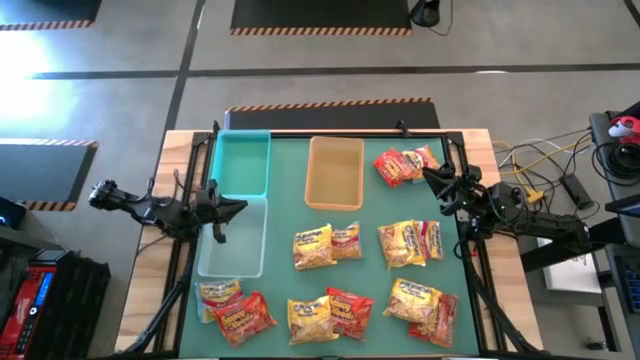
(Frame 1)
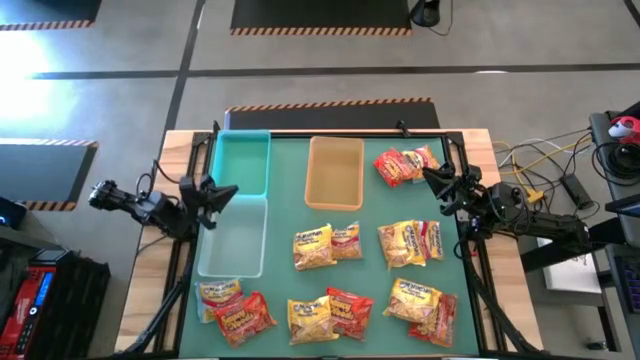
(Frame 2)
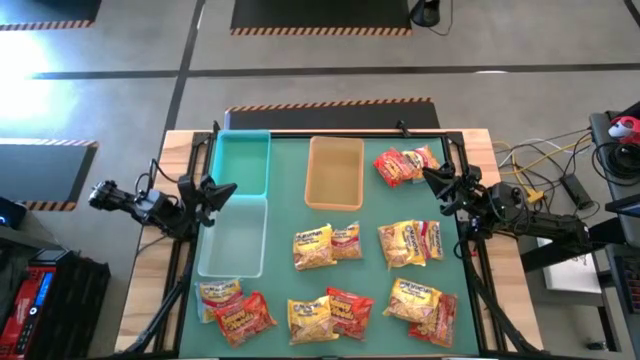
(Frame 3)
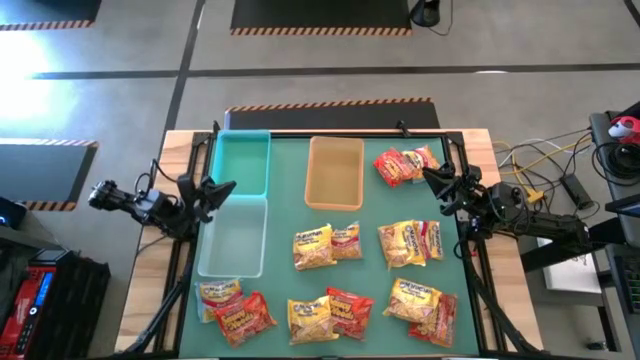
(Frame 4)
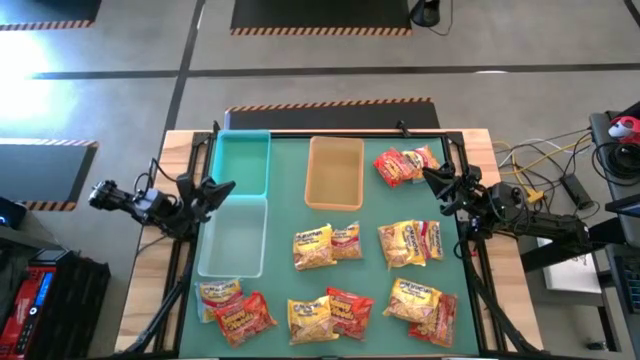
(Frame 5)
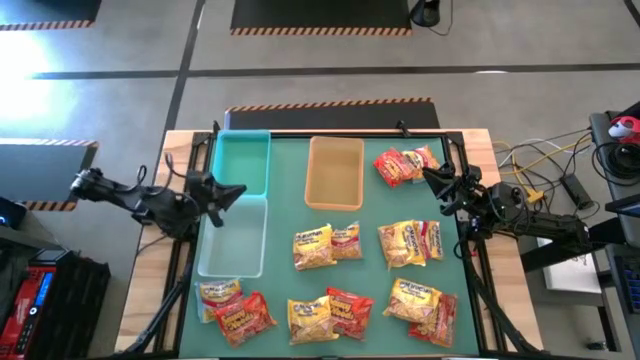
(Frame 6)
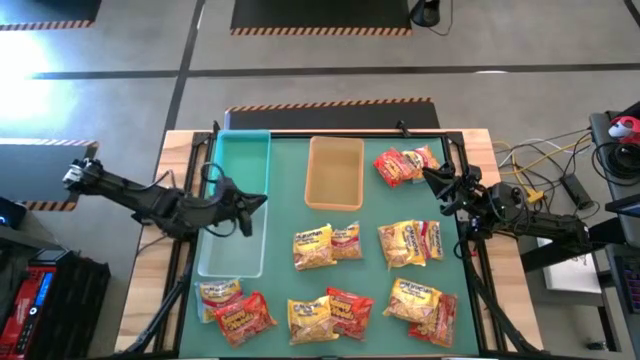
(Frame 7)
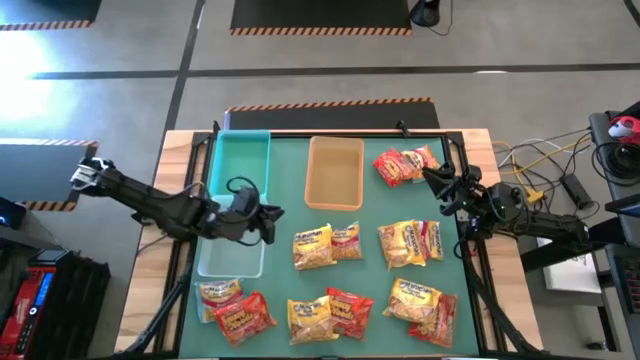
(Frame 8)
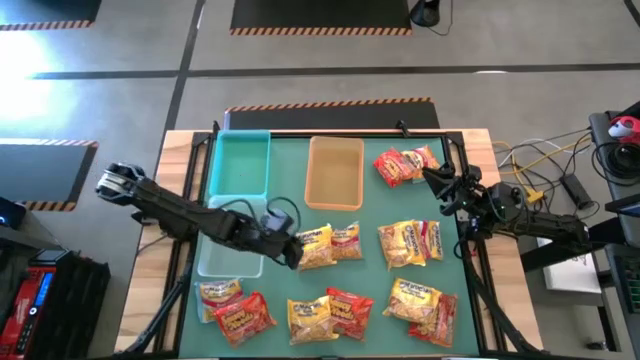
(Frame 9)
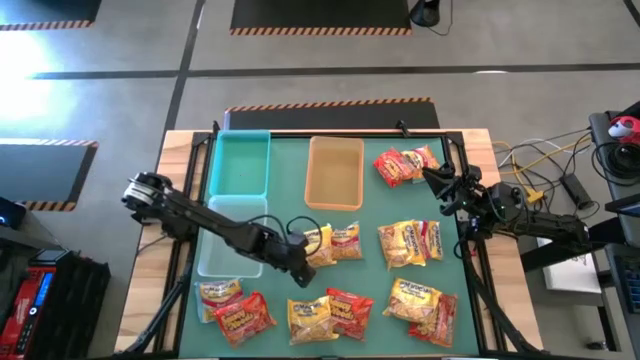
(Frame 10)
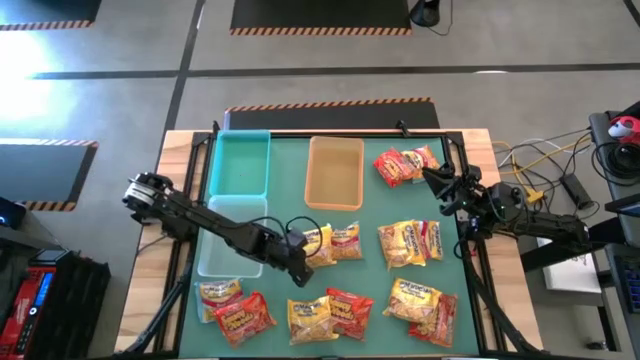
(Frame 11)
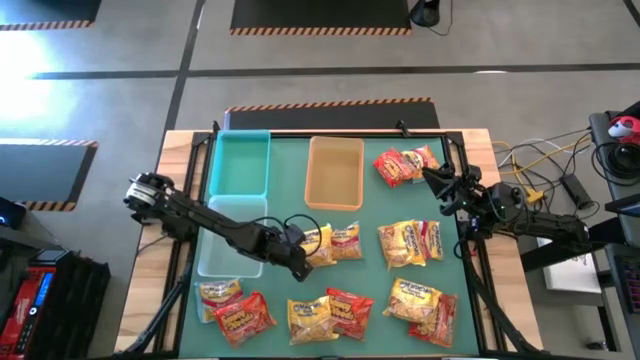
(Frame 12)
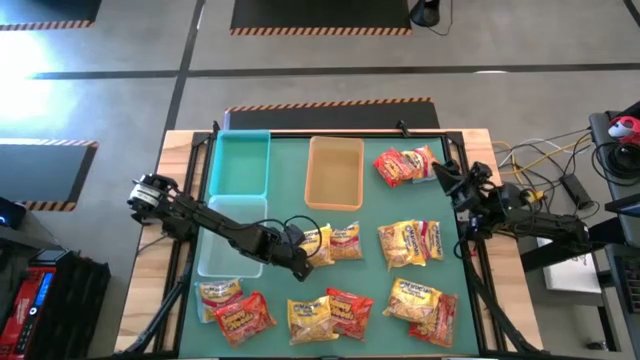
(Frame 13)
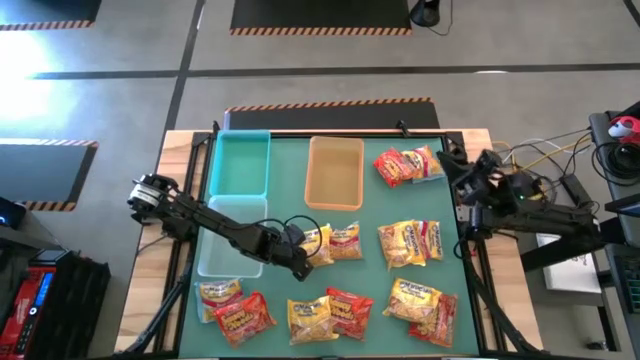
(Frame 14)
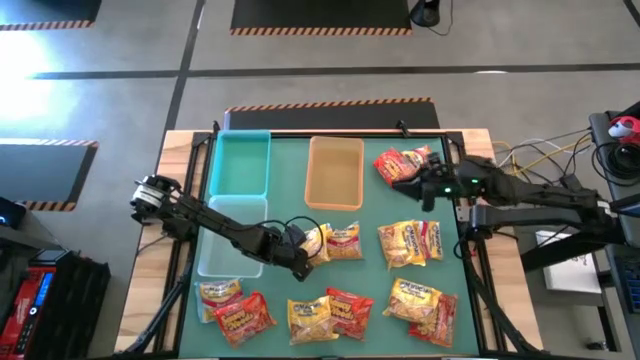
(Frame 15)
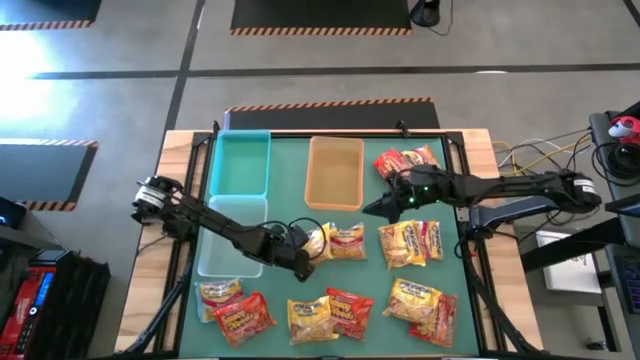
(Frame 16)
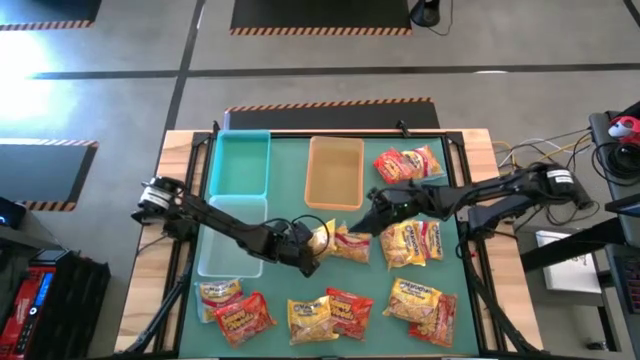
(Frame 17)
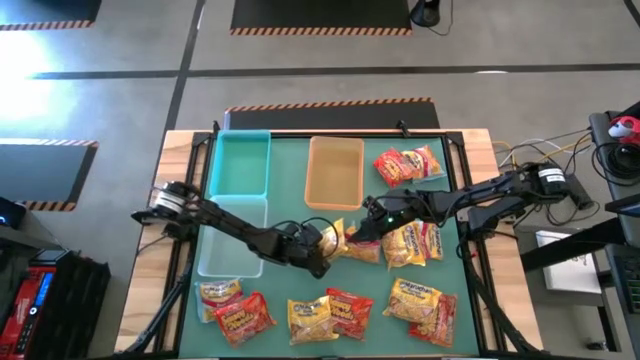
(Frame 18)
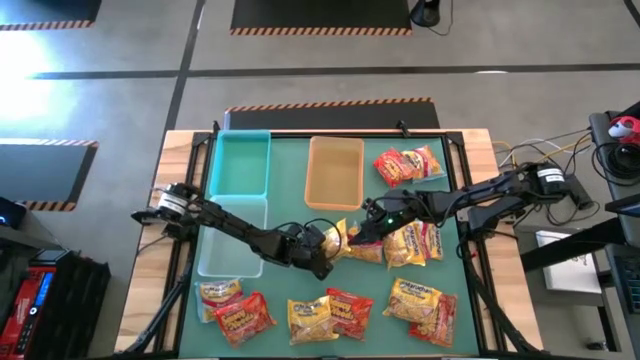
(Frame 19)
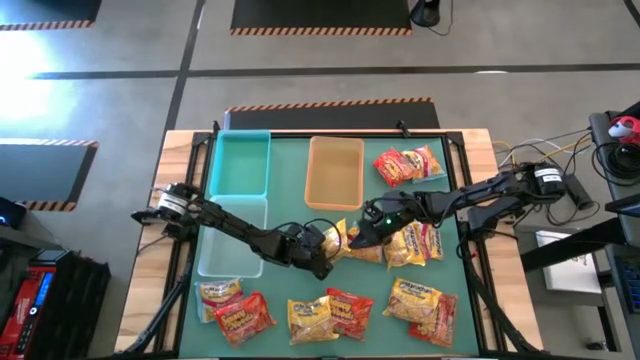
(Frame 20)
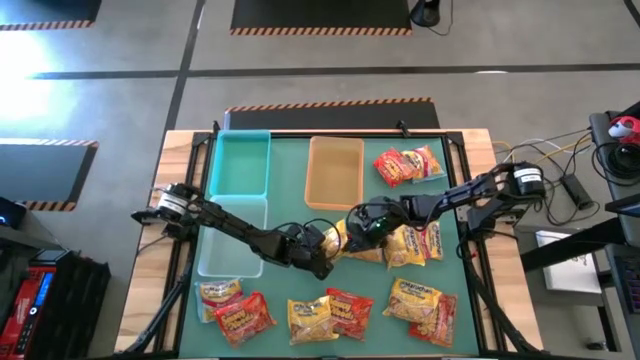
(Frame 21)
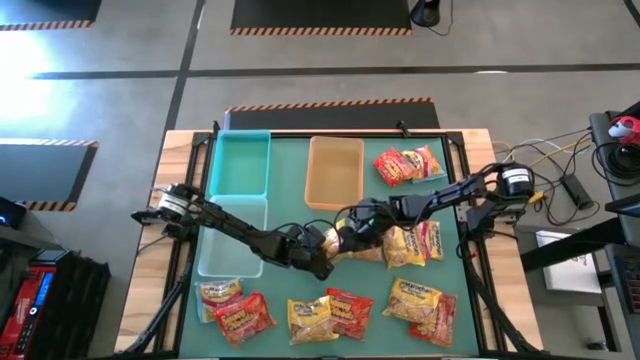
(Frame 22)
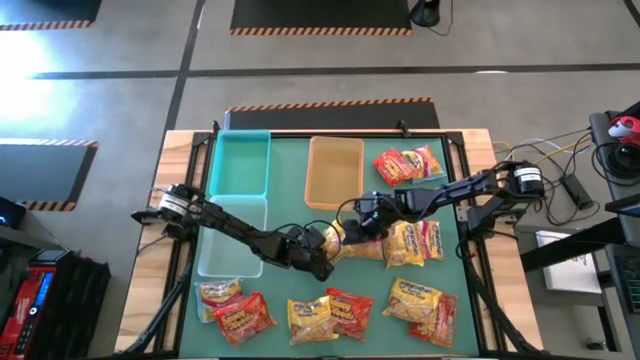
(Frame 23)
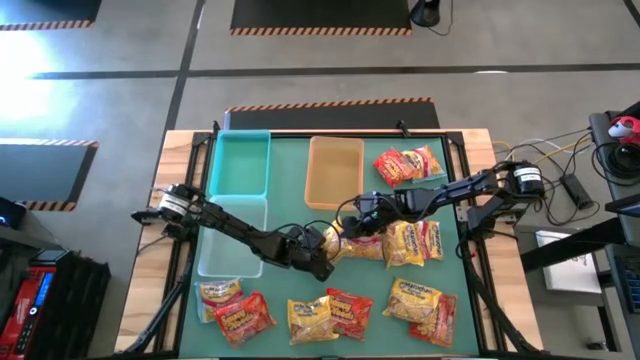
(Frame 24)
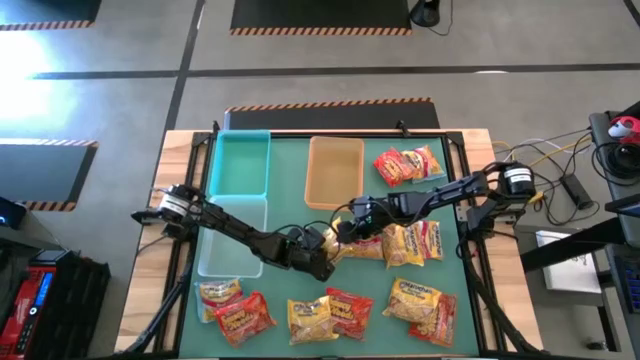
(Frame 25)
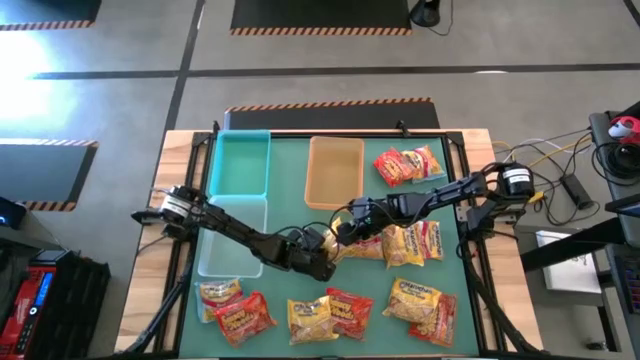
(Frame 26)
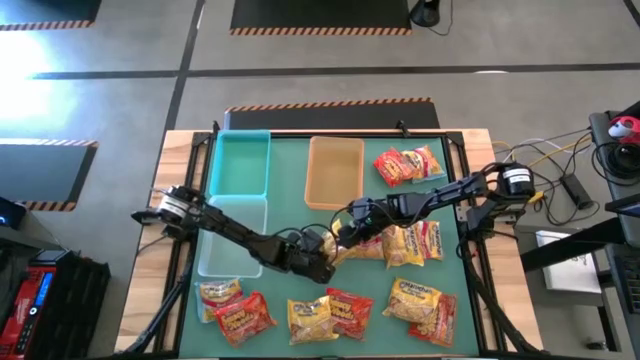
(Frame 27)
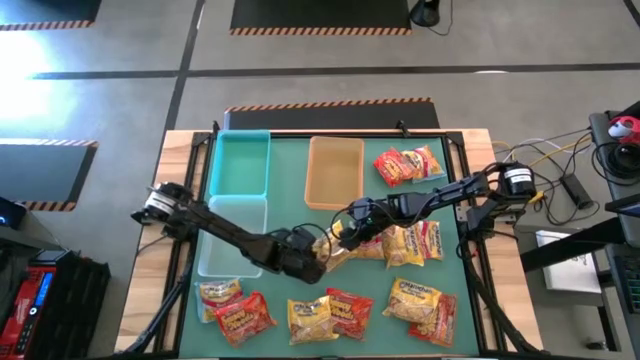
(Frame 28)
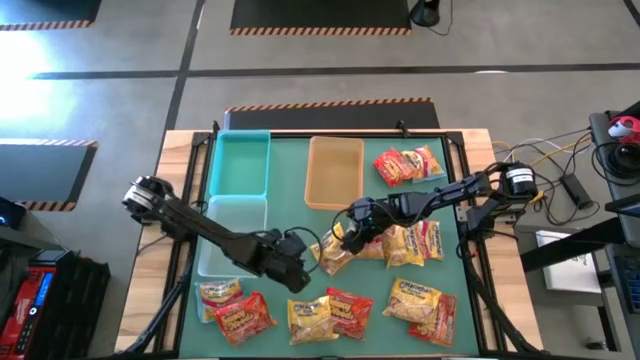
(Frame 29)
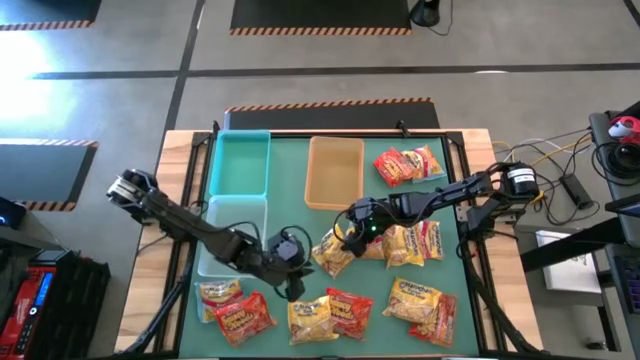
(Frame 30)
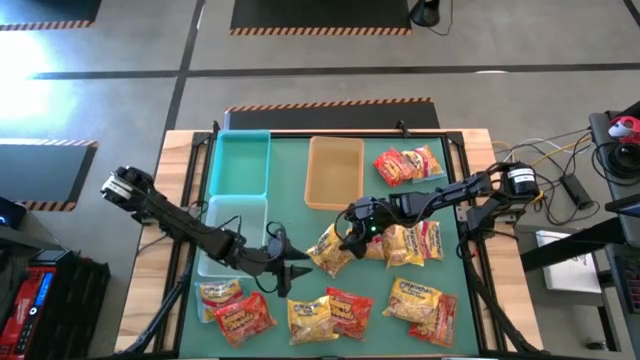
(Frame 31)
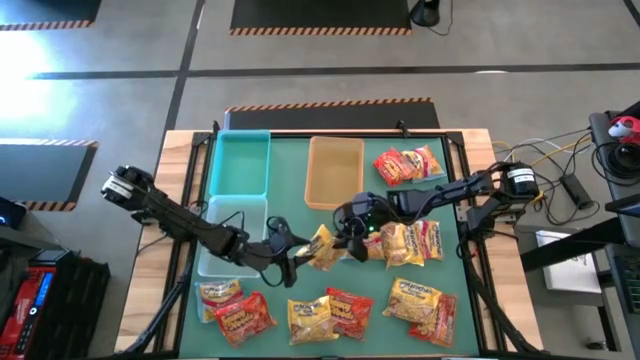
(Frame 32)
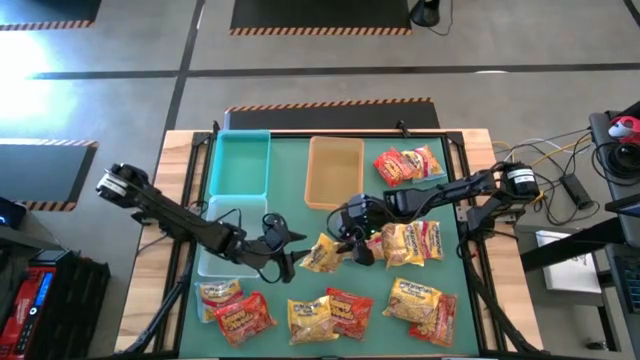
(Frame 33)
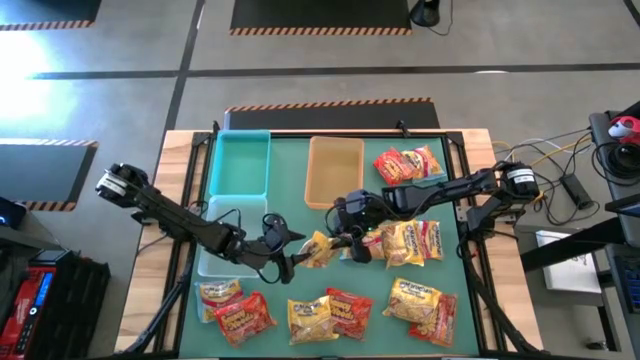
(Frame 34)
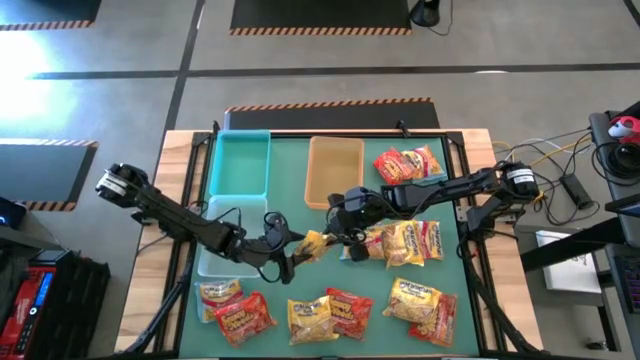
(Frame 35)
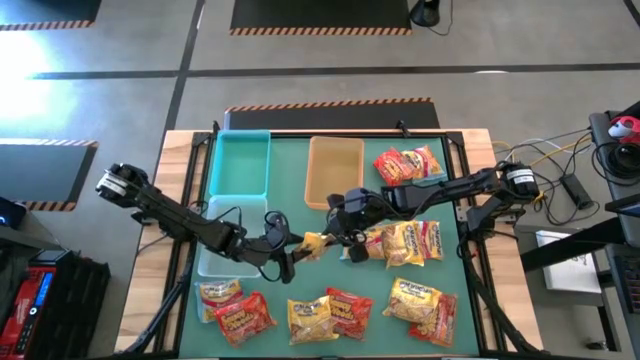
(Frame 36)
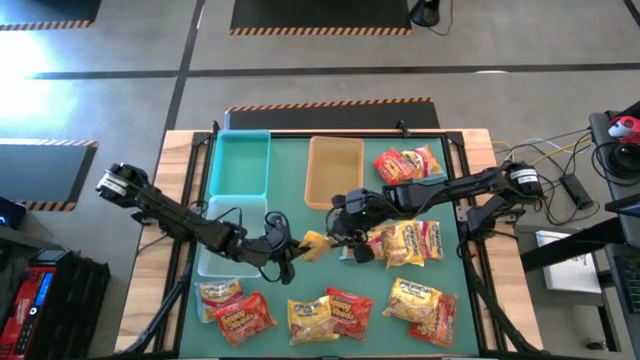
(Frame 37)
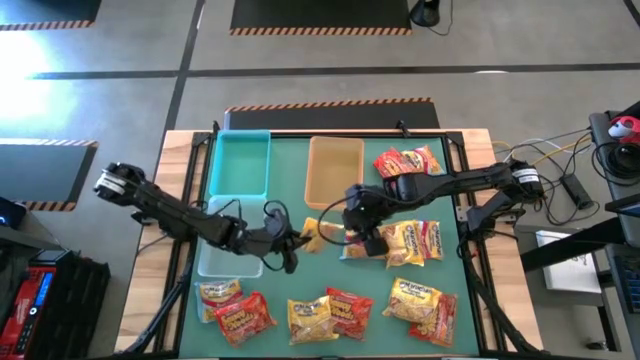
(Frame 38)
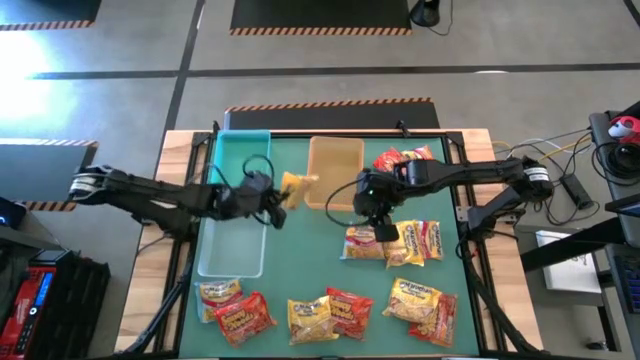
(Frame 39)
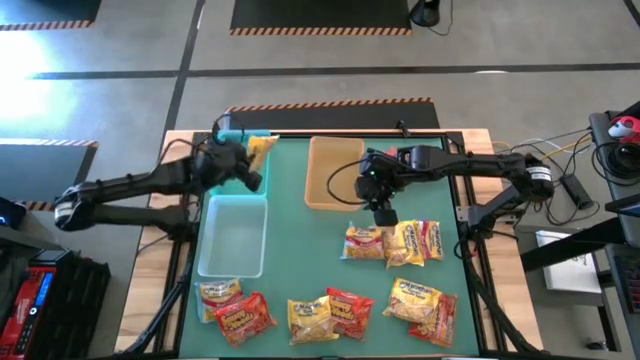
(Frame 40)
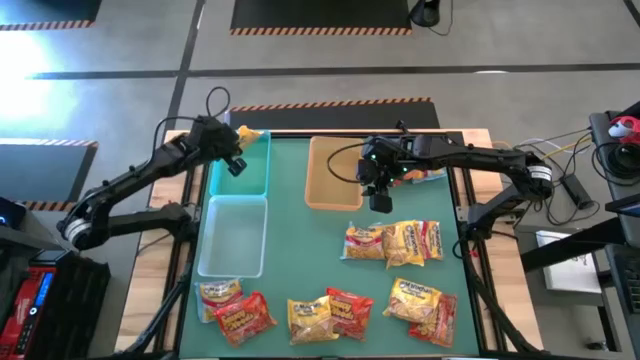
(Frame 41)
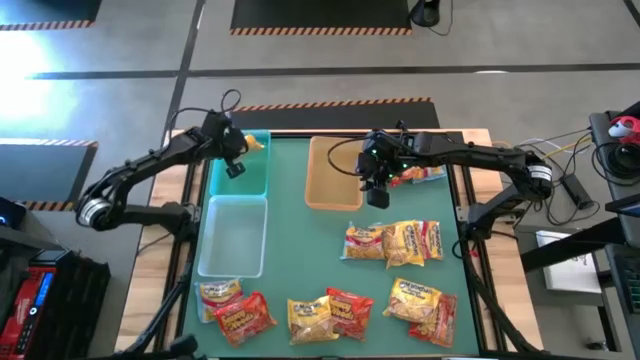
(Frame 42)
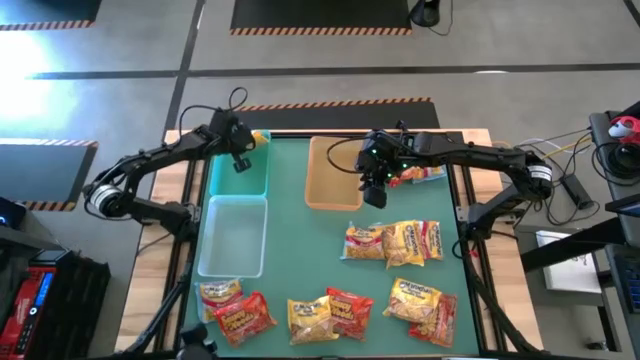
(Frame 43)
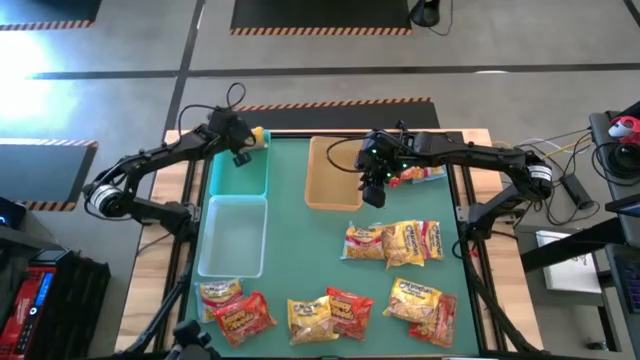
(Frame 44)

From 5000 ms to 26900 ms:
Task: Sort Maruchan noodles
Put the yellow noodle pack into the blue bin
